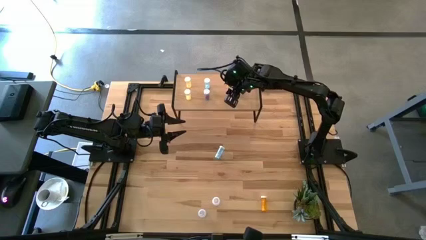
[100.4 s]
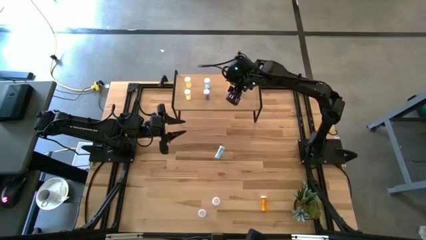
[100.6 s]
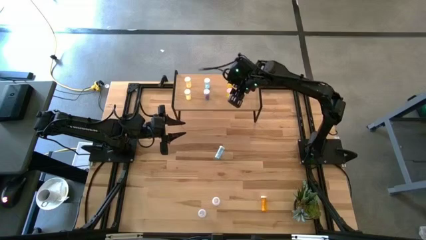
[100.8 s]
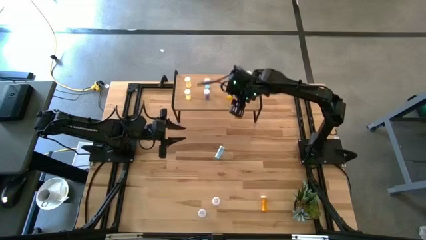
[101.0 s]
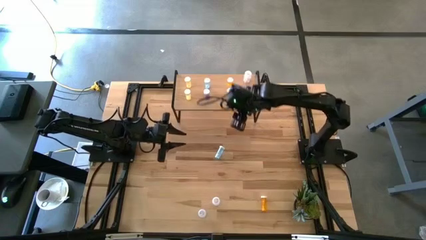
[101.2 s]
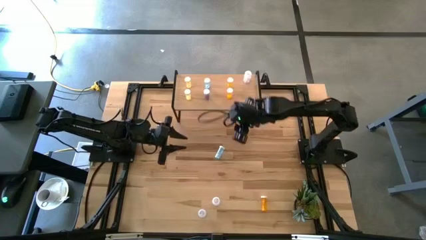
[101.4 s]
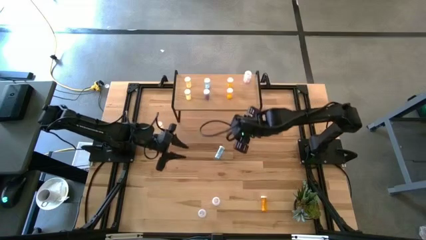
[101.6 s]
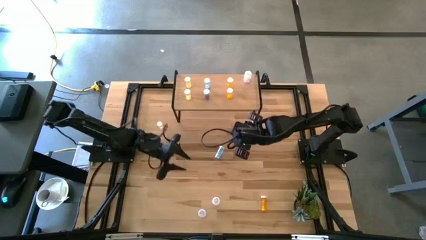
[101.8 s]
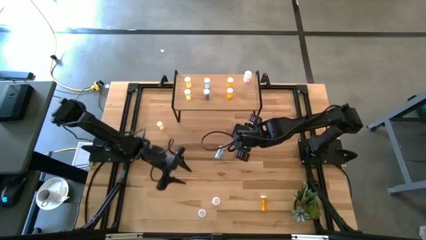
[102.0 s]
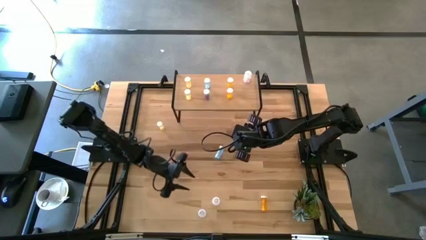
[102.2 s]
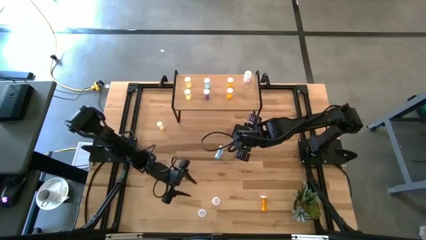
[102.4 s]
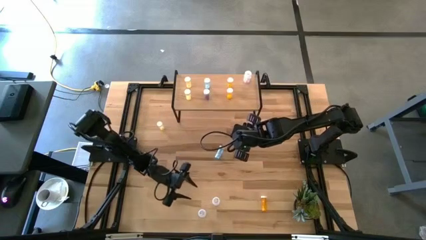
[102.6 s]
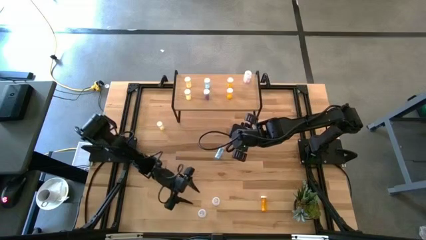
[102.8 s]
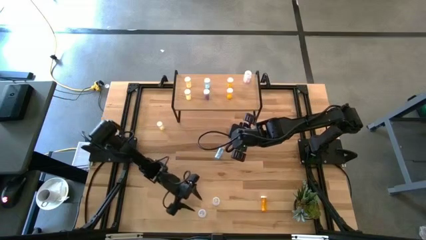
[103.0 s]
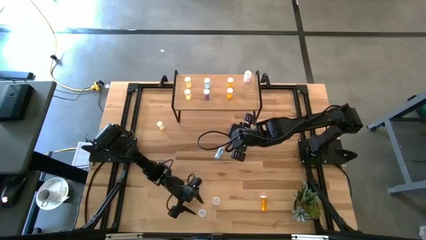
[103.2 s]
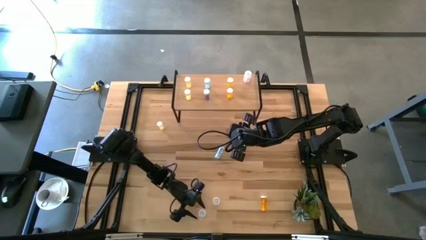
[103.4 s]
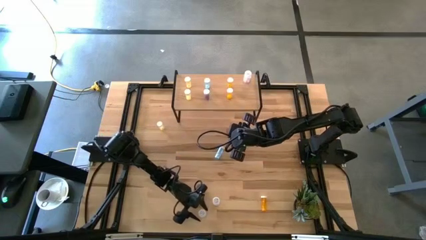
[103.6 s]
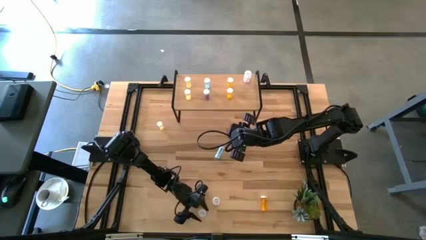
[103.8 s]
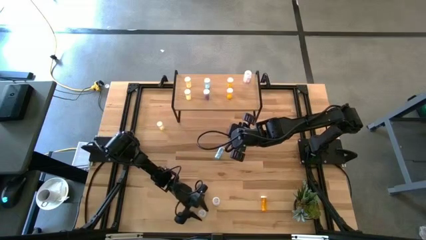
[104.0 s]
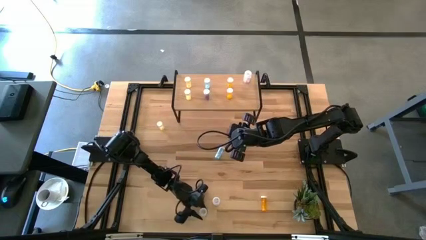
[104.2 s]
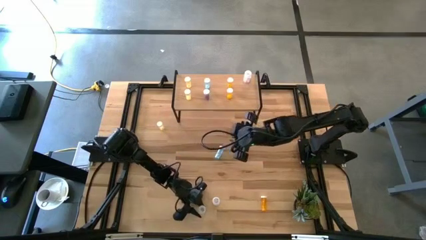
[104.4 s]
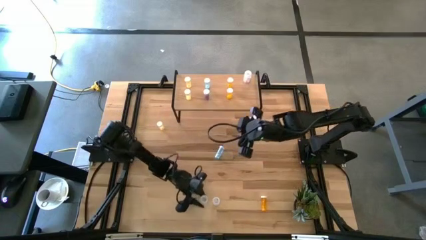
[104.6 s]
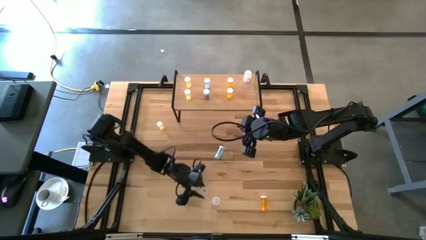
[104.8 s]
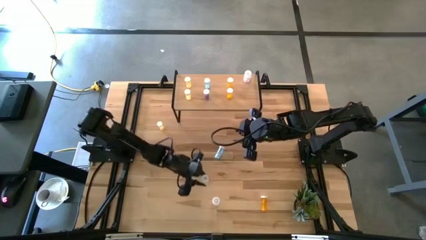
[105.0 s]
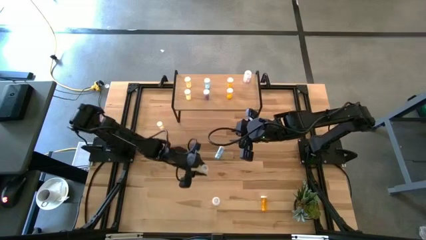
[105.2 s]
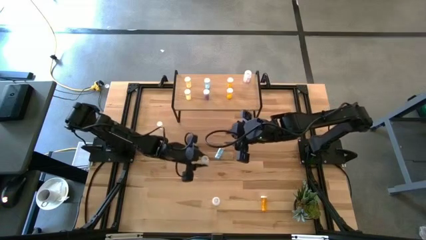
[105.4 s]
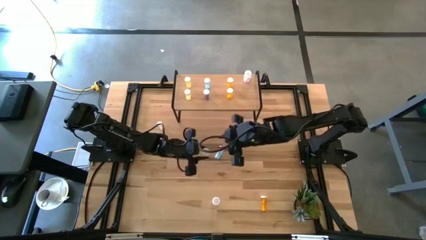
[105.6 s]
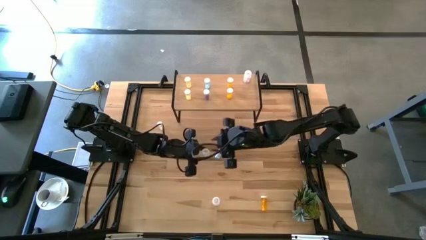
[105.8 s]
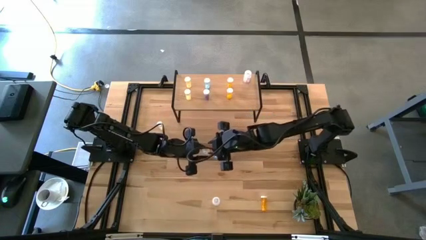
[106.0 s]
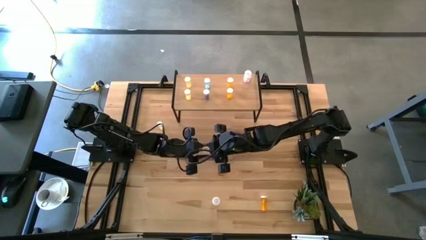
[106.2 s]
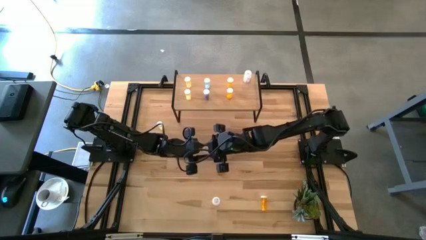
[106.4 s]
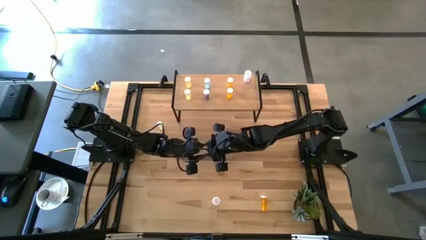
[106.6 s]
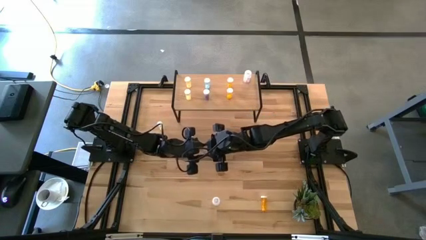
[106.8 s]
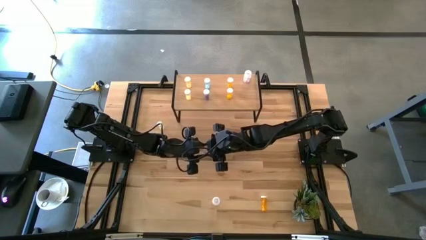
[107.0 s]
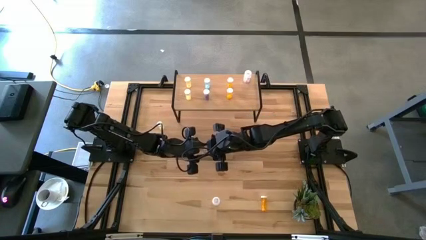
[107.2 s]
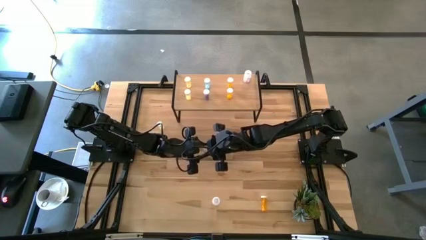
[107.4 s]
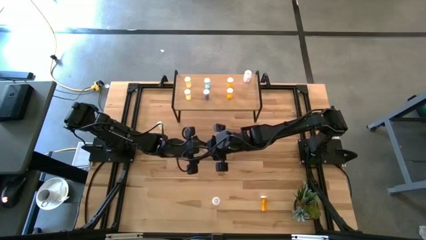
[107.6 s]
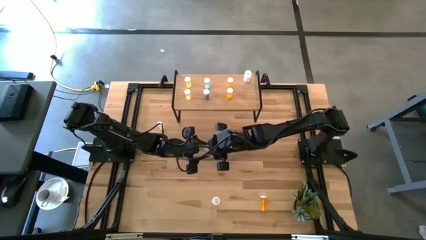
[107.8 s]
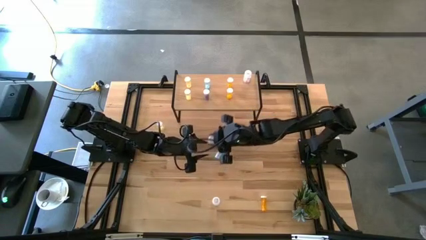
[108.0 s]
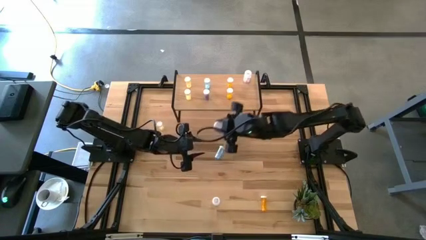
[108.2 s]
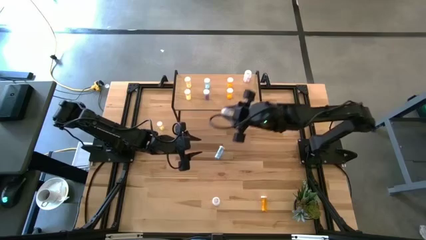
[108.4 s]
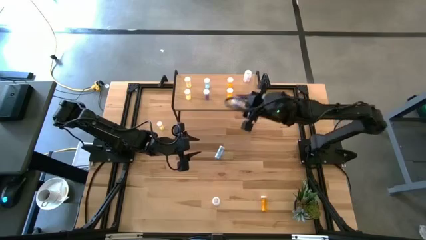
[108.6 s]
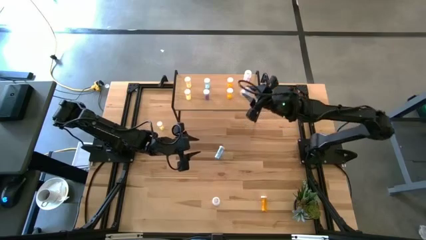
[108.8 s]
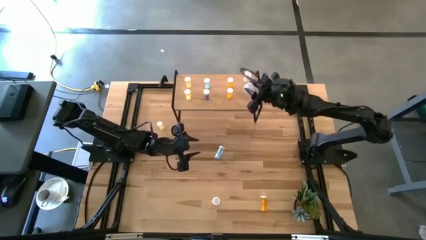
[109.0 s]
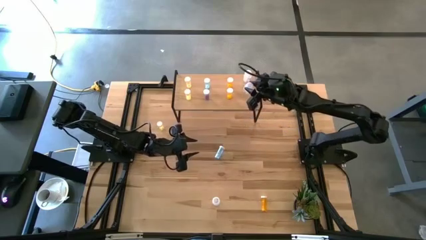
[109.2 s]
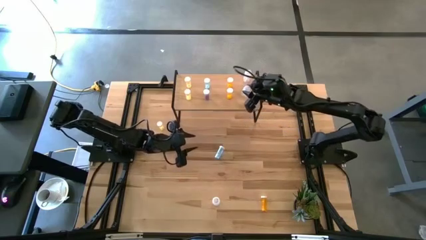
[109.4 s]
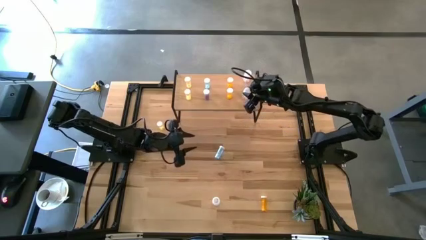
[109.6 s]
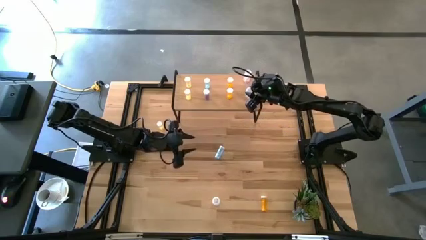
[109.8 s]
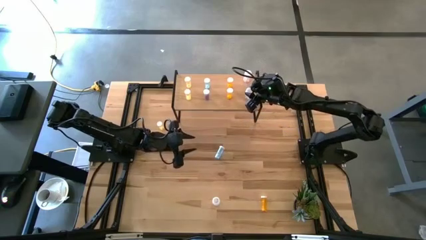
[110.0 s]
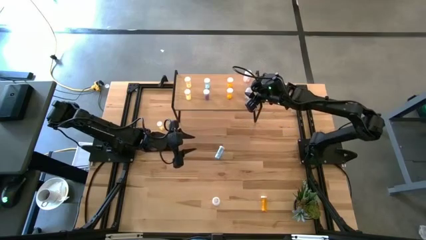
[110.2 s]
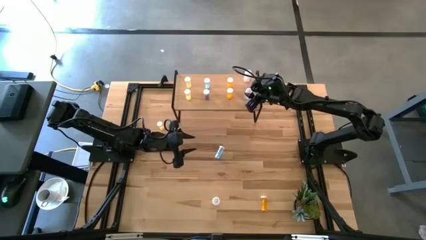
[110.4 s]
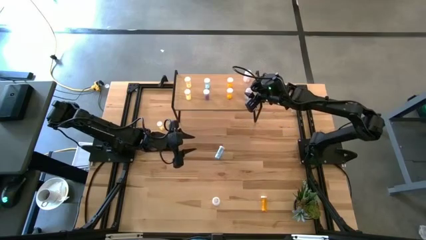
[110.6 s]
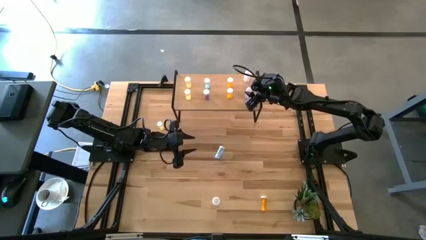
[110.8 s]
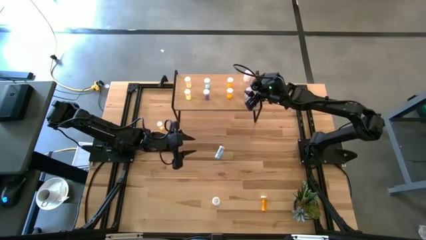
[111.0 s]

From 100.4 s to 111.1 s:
Task: Pick and place medicine bottles onto shelf by color
Put the bottom transparent pill bottle on the shelf aligned with the other transparent pill bottle

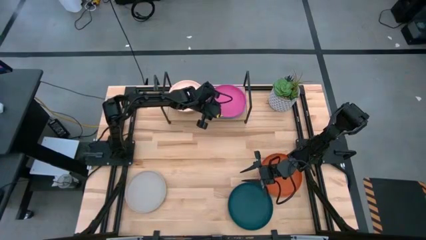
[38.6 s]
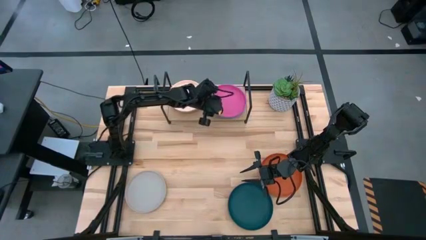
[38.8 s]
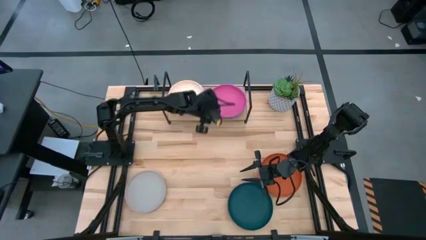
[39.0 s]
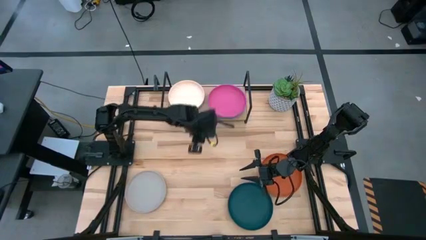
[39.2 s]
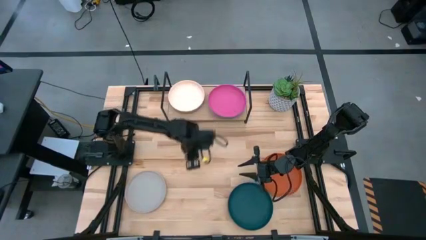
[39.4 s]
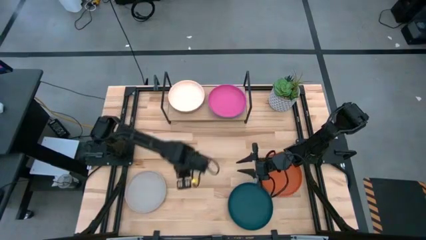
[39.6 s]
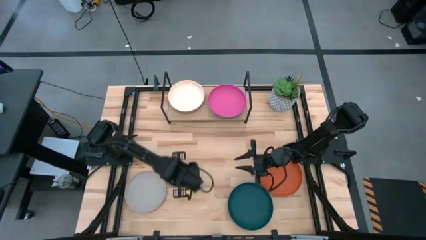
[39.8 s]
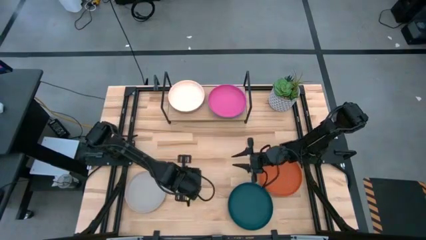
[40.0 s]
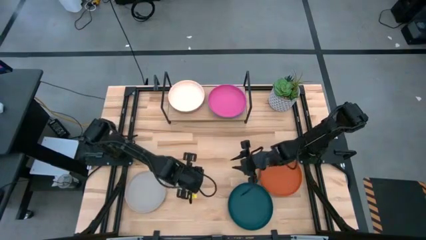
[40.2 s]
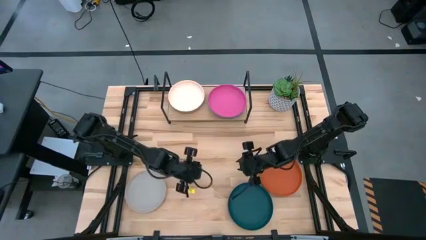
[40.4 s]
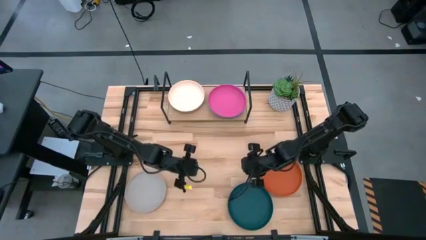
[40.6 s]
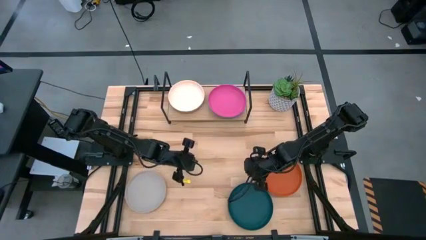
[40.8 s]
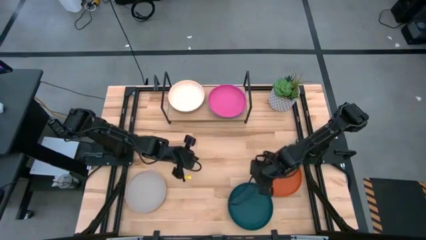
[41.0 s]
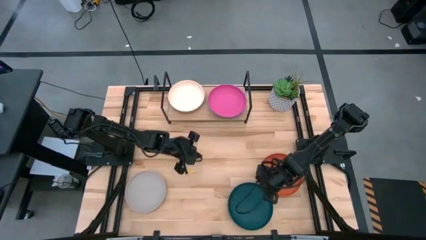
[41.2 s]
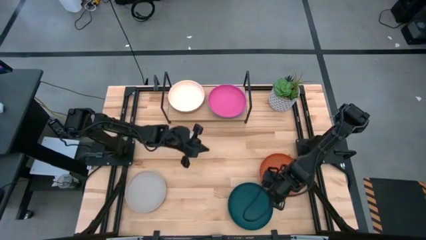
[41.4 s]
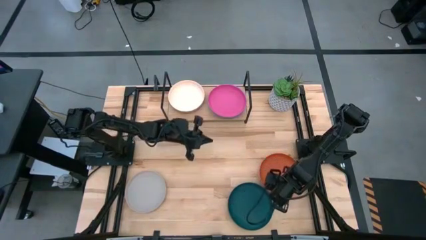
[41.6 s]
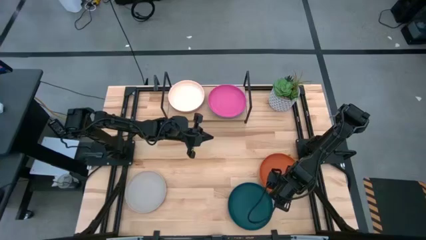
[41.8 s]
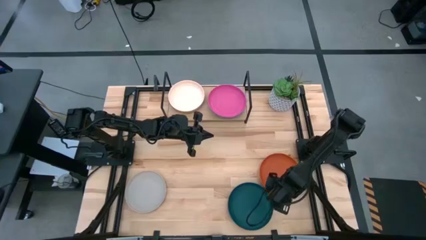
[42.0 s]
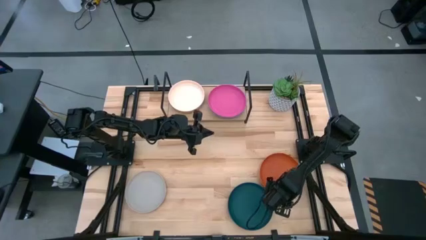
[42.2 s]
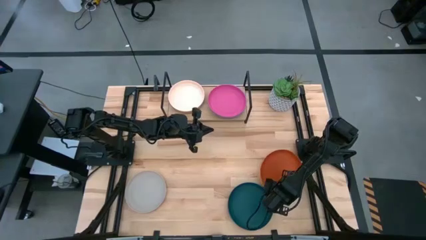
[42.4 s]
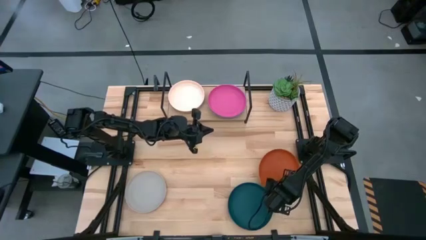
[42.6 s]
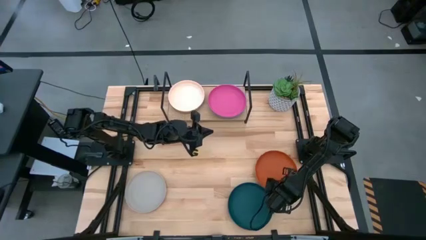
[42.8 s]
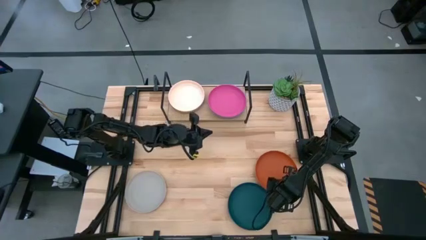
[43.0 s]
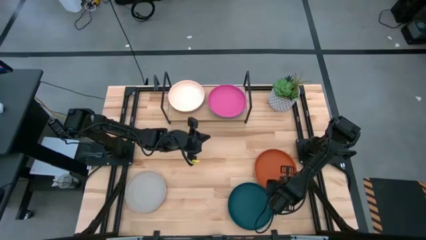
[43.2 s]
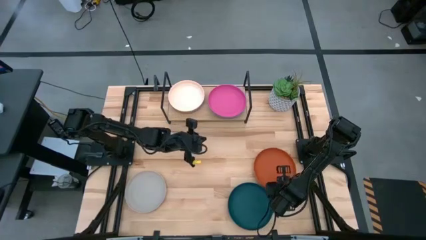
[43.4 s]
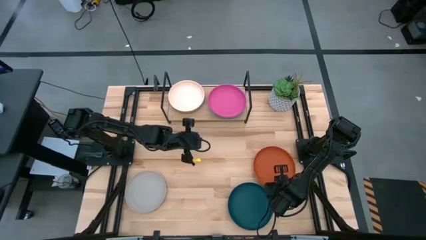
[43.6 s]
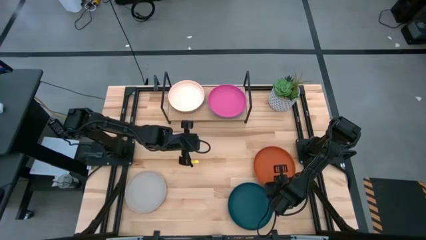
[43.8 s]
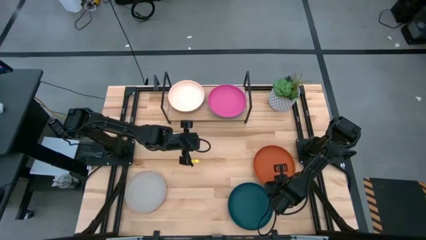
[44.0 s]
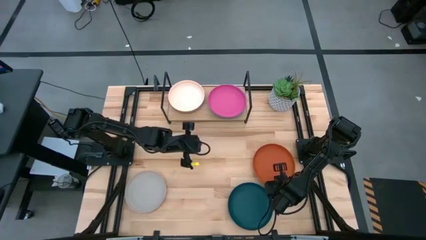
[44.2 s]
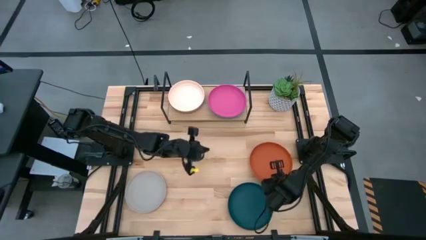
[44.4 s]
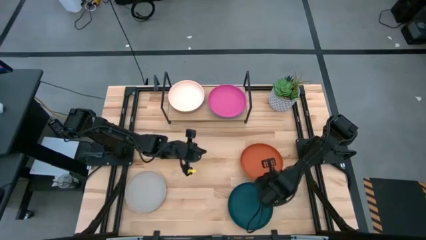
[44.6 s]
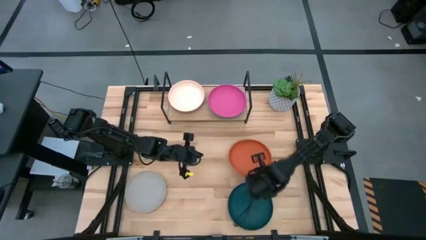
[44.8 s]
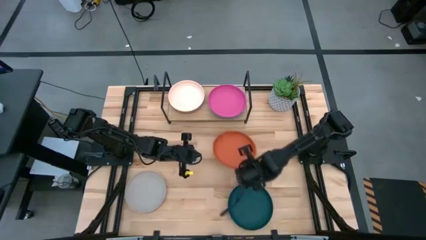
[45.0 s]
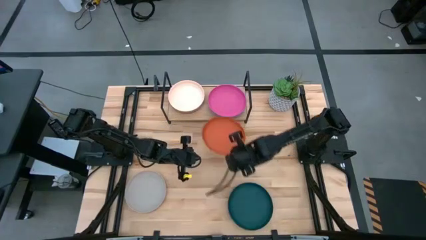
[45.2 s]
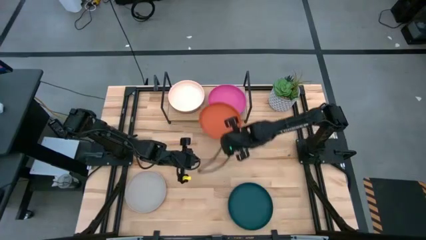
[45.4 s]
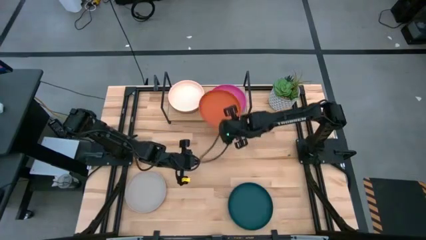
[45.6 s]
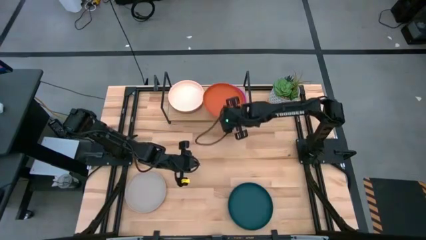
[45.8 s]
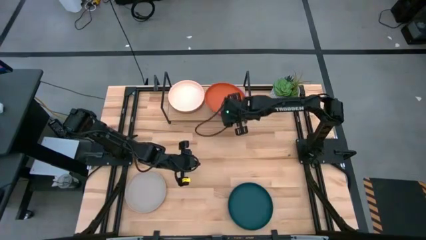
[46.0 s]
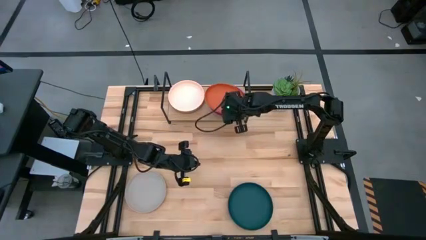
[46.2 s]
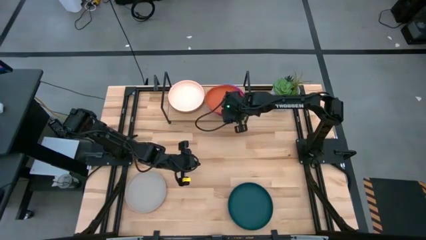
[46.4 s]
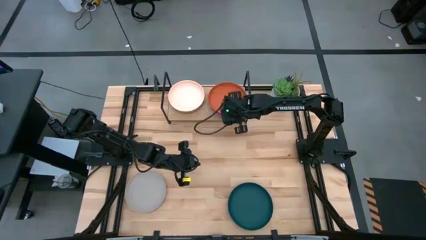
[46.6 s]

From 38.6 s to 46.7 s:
Task: Place and stack plates onto a shelf
Stack the orange plate on top of the pink plate on the shelf
